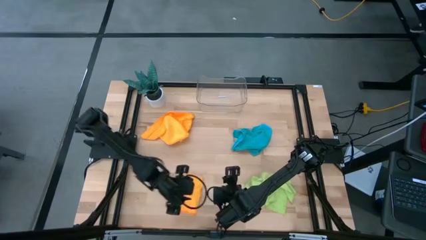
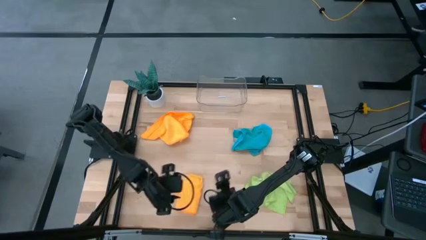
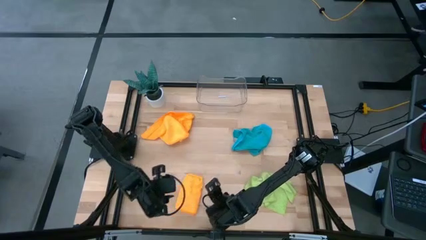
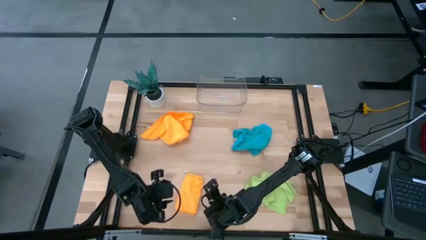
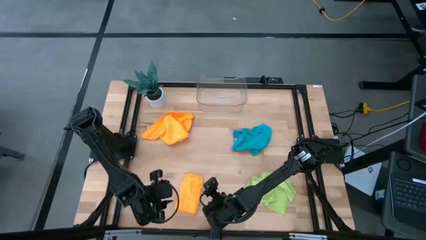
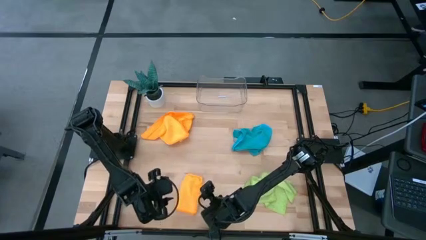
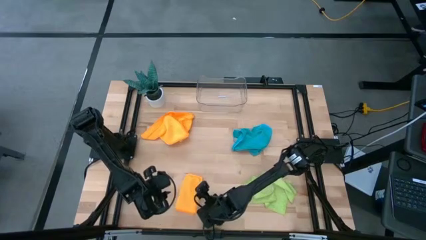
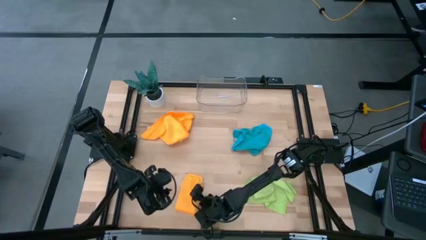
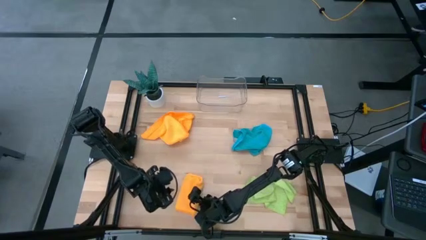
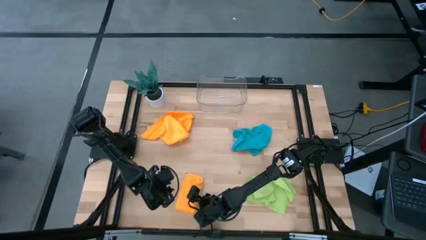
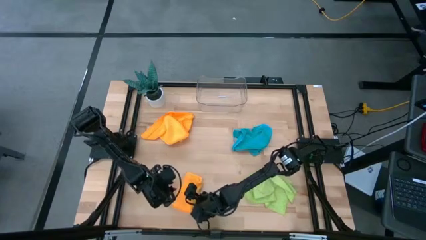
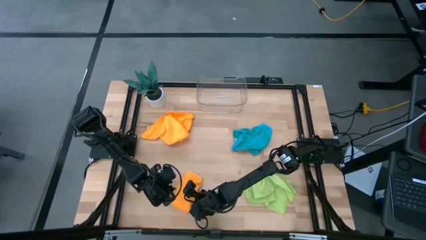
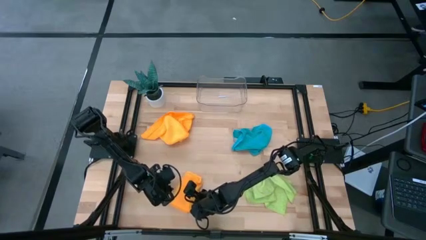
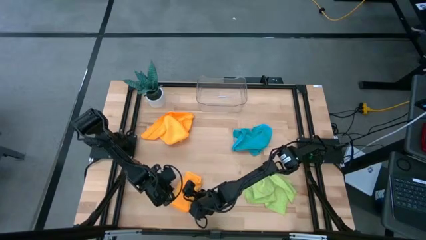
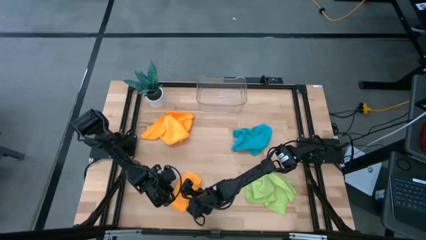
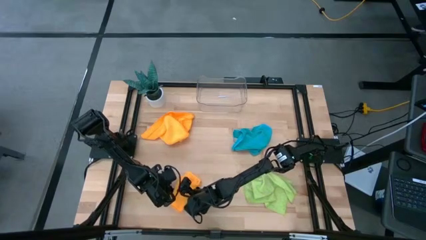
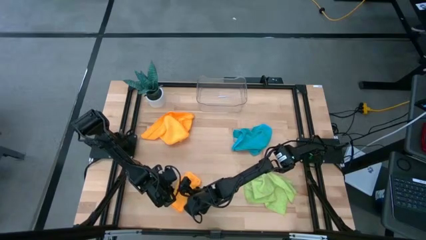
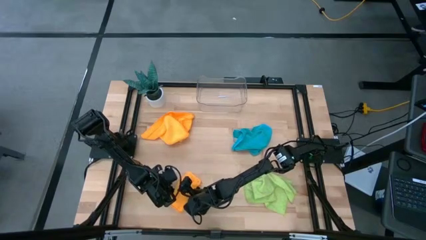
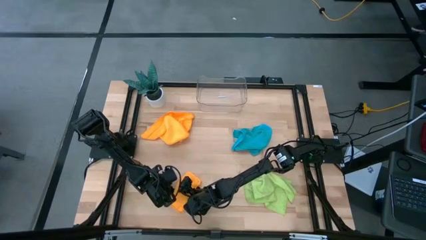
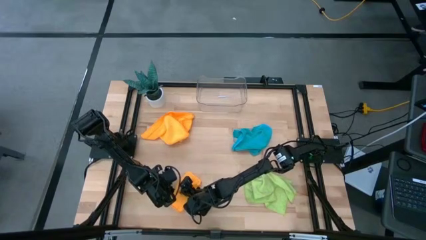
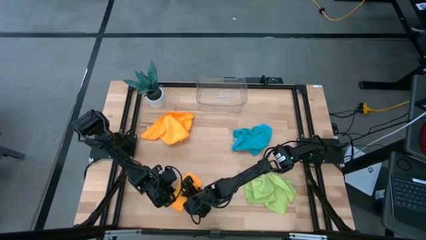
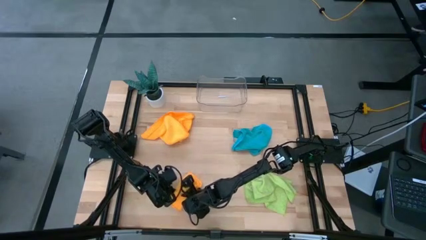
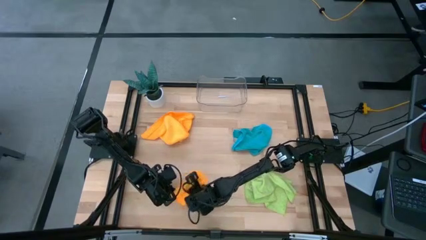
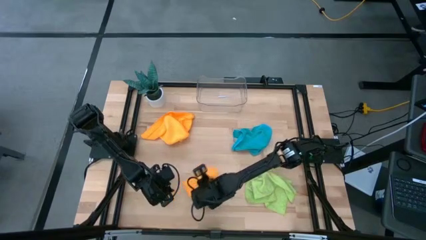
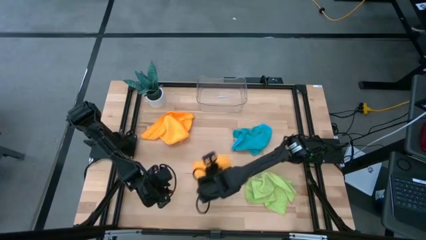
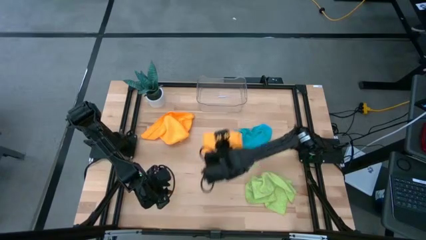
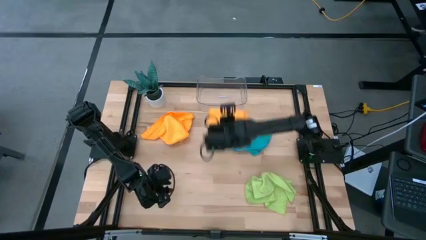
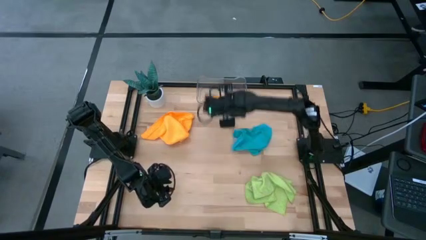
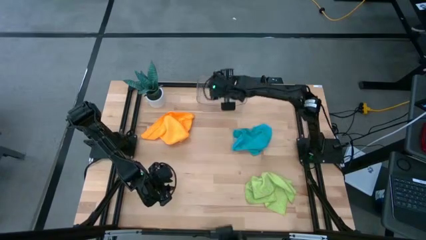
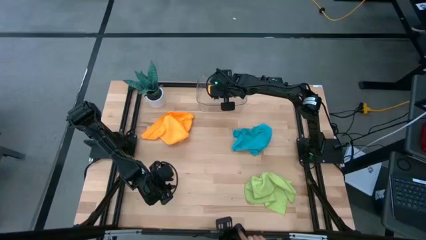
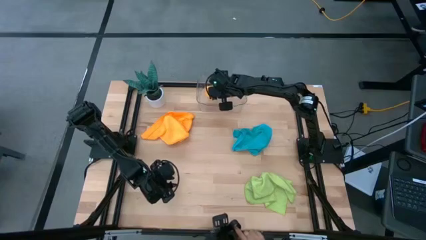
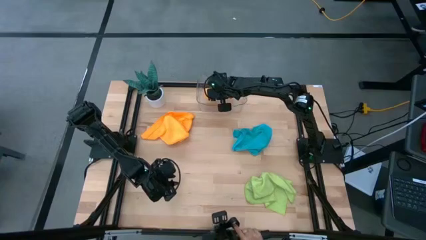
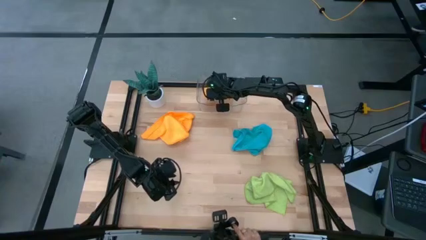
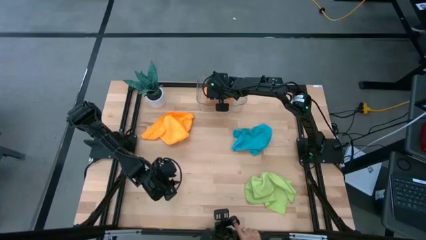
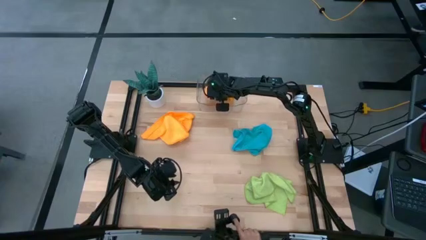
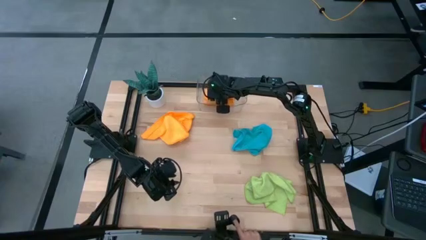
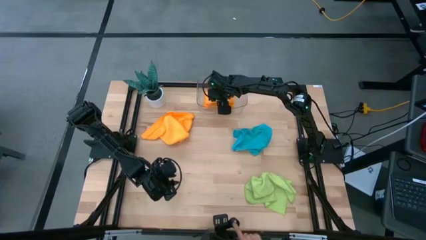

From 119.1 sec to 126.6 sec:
Task: Fold microfiber towels
Put the bottom orange microfiber towel into the transparent bin

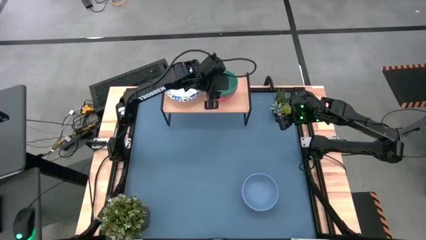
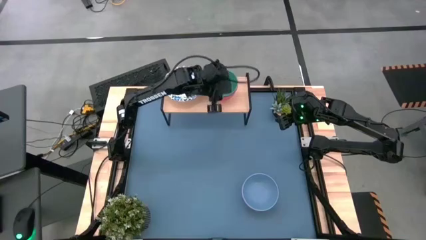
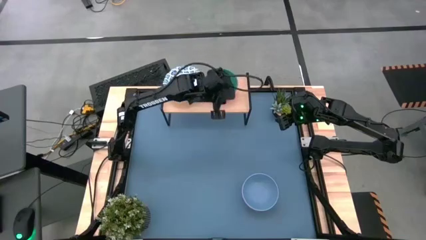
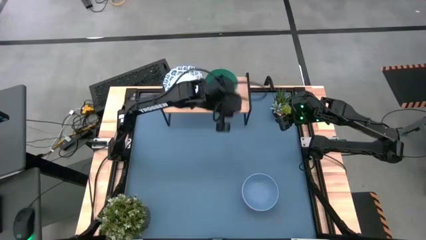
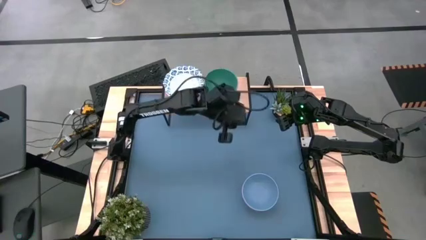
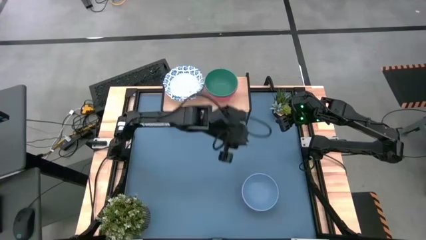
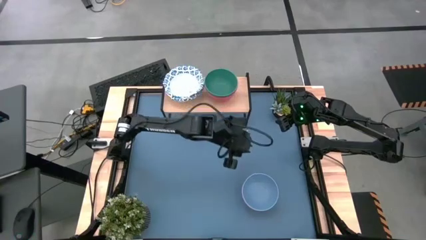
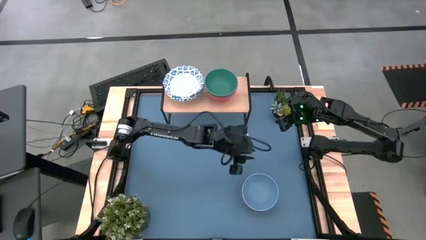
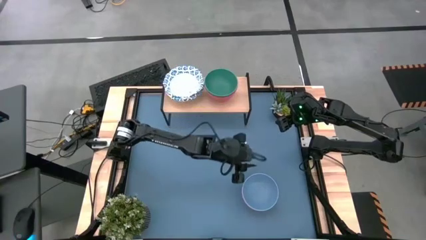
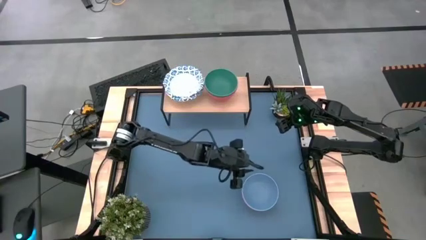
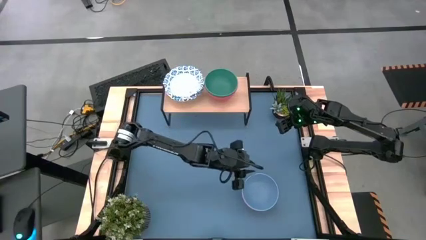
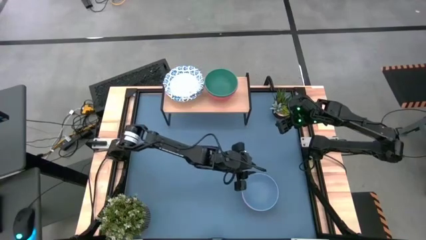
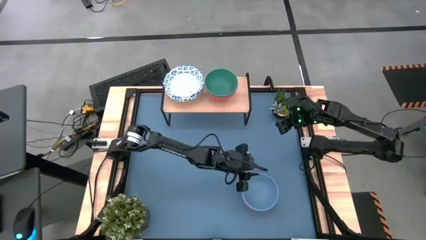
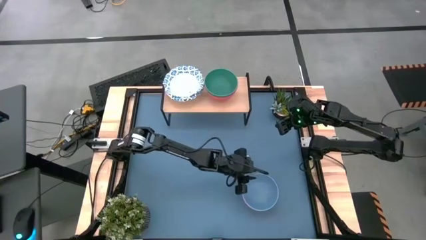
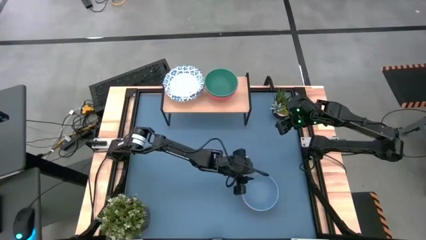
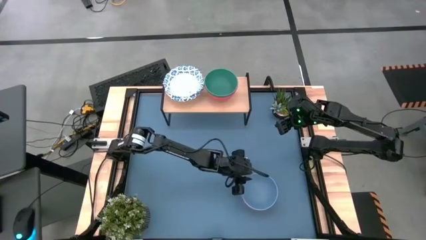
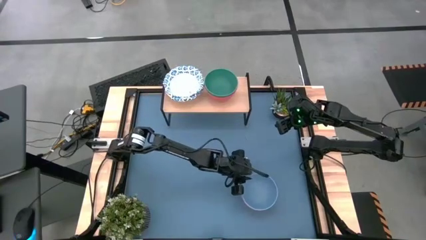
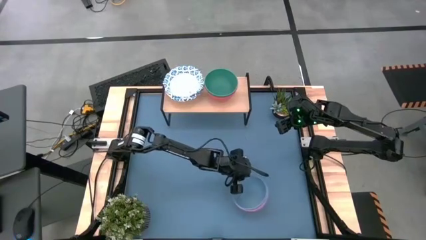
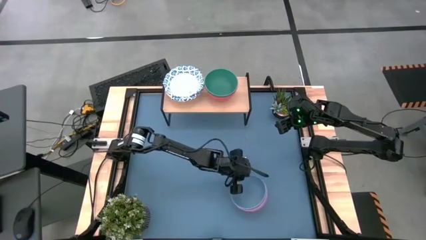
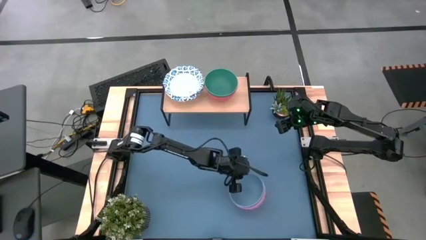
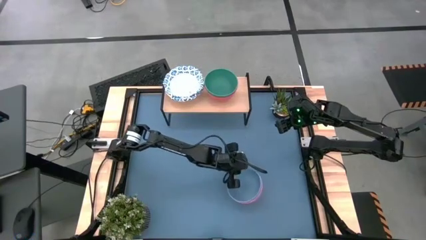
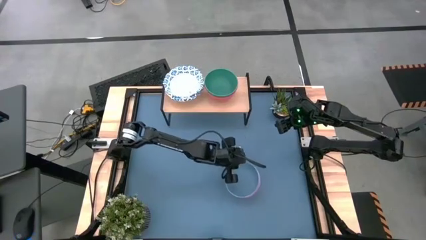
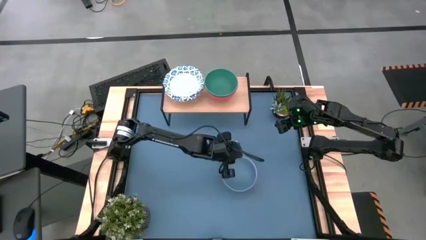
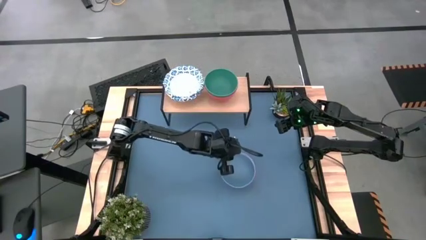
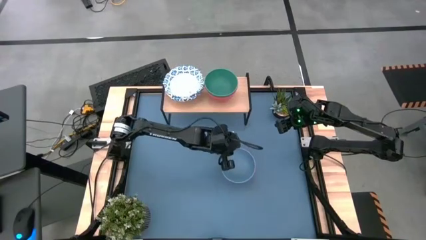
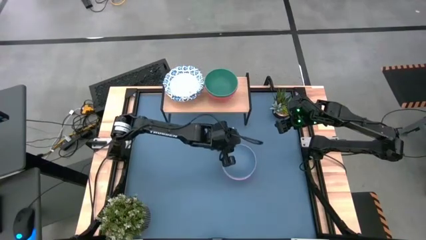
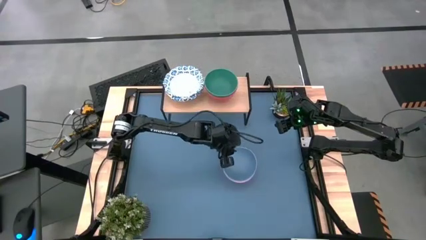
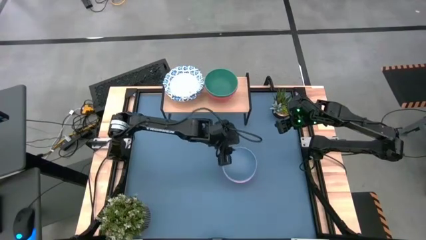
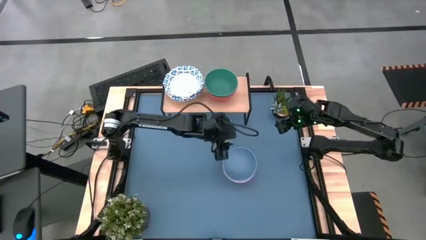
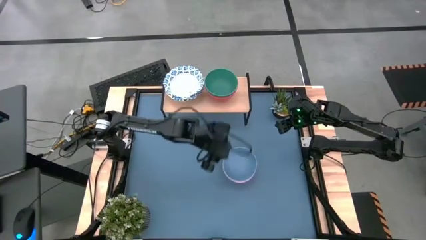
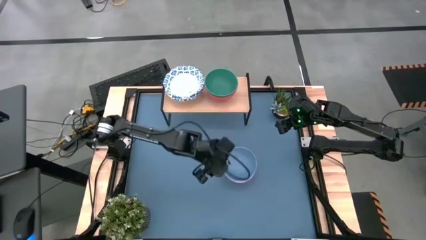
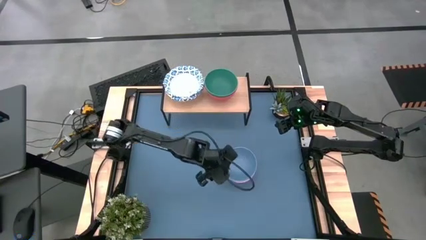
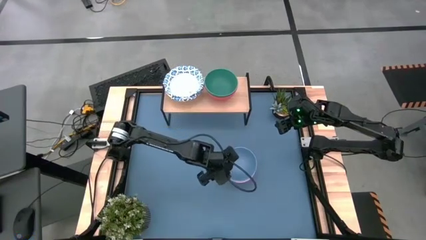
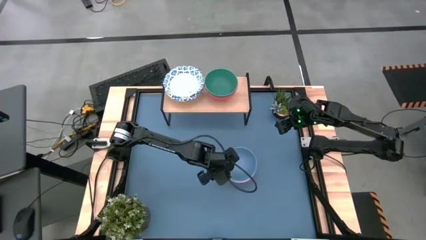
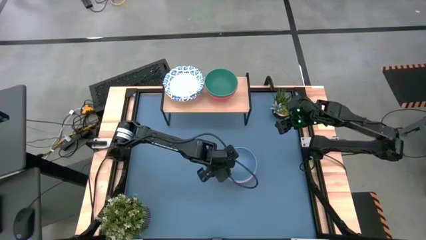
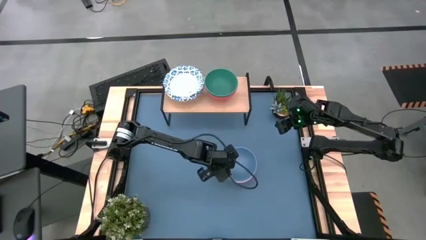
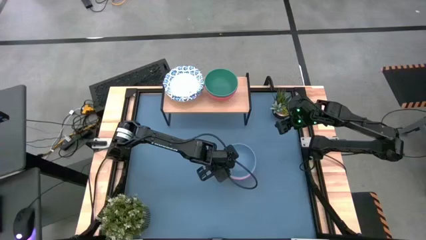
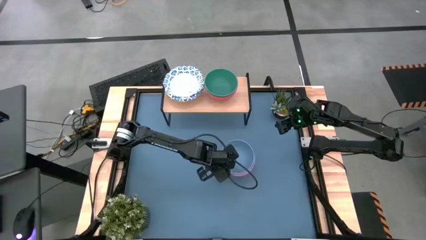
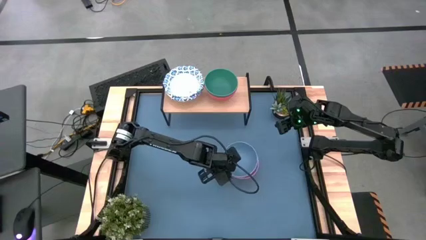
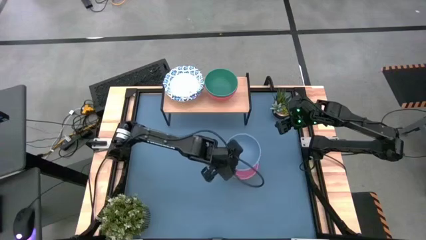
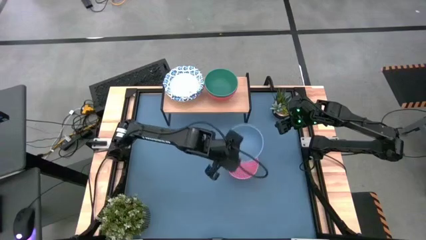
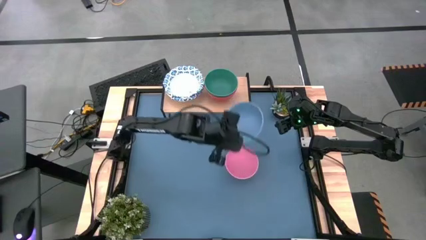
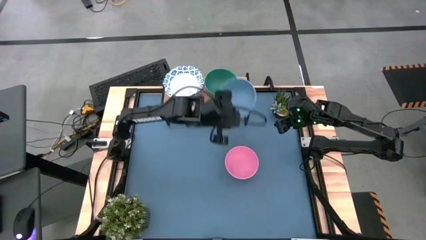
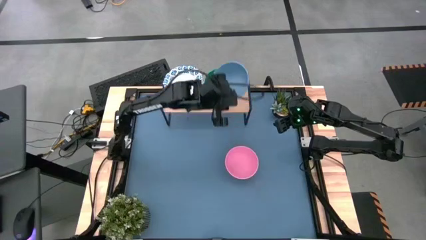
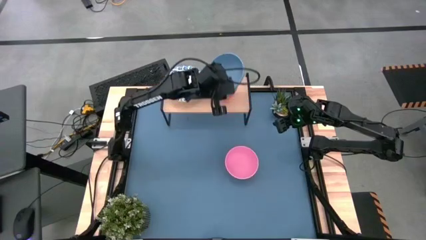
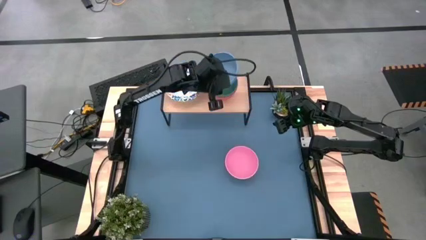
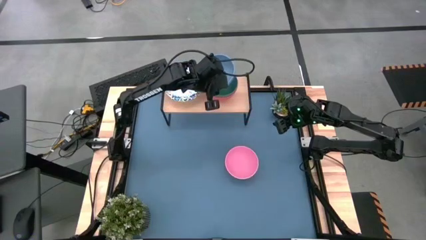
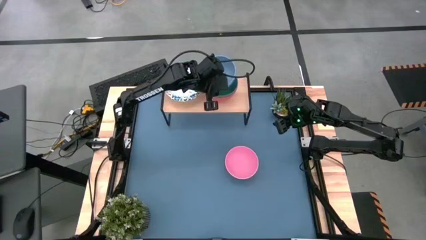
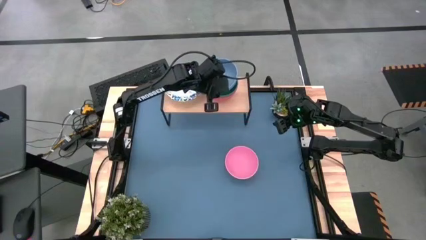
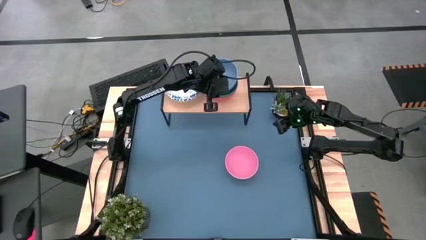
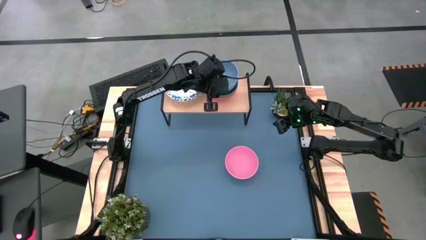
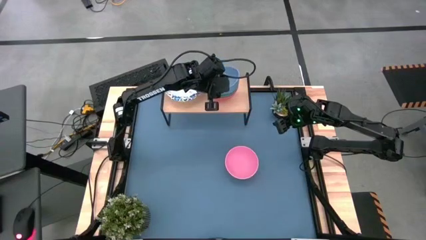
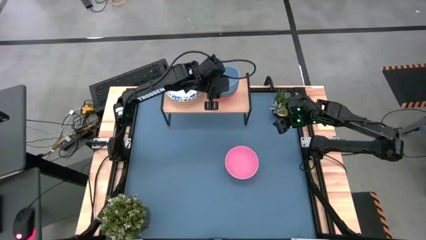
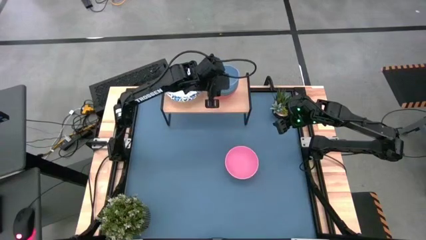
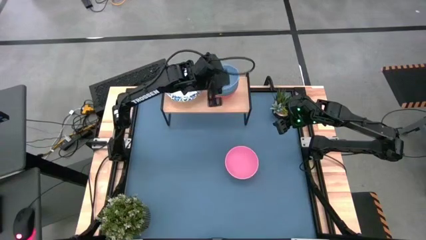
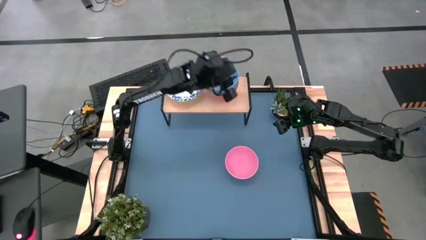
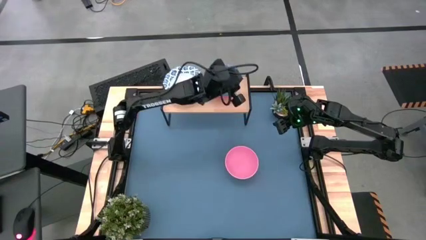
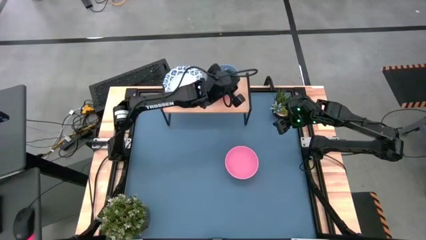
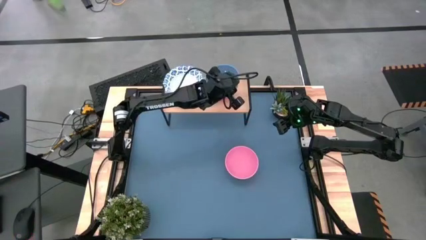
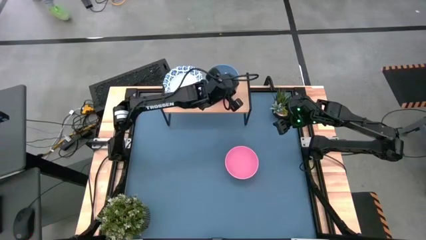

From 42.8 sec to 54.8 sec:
Task: Place and stack bowls onto a shelf
Stack the blue bowl on the green bowl on the shelf
